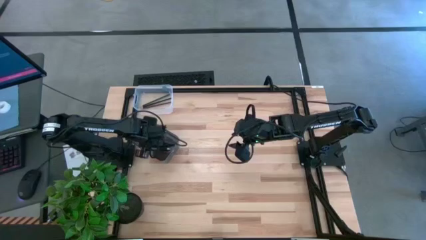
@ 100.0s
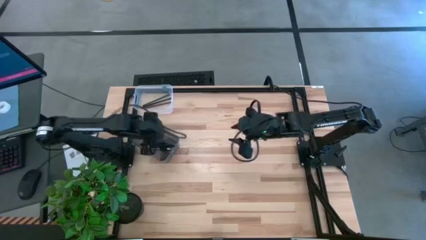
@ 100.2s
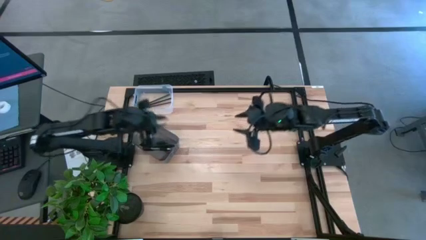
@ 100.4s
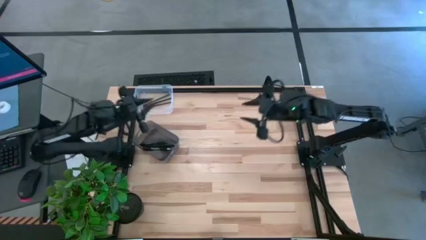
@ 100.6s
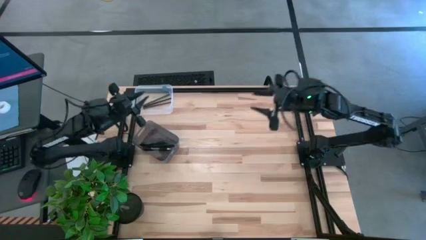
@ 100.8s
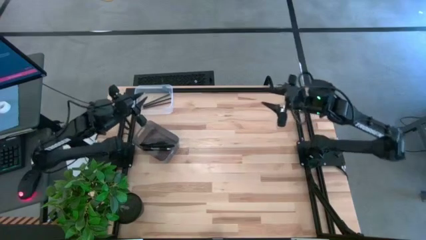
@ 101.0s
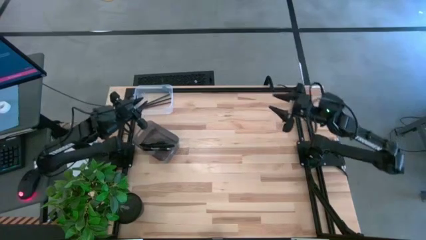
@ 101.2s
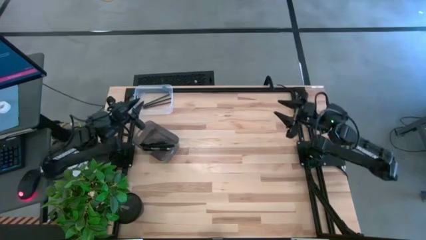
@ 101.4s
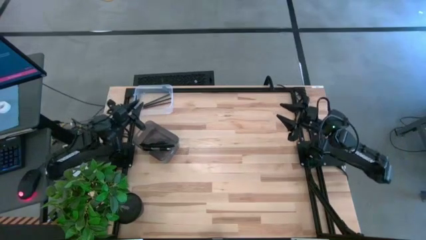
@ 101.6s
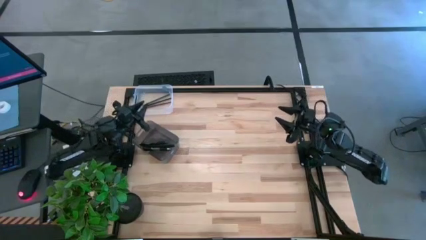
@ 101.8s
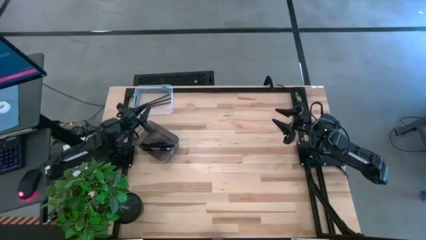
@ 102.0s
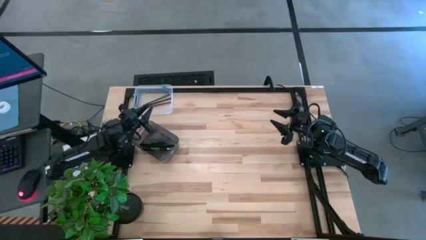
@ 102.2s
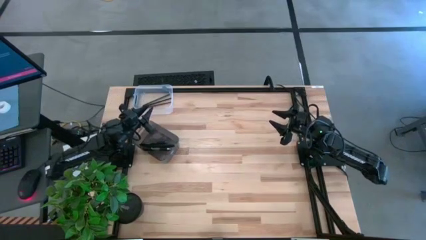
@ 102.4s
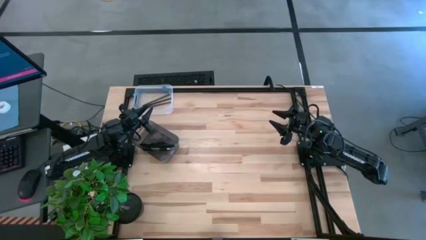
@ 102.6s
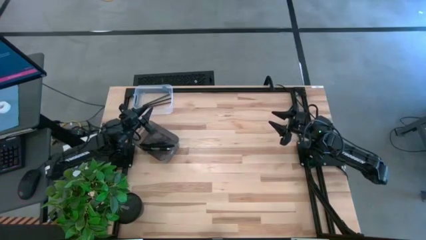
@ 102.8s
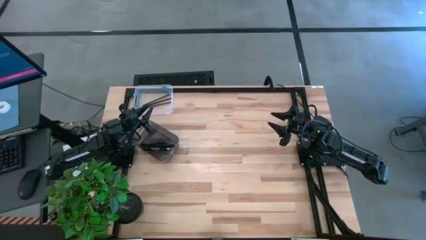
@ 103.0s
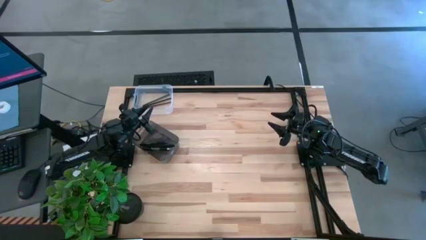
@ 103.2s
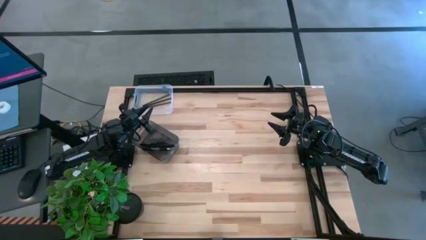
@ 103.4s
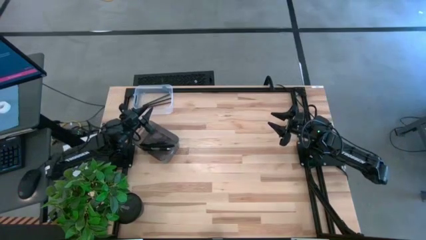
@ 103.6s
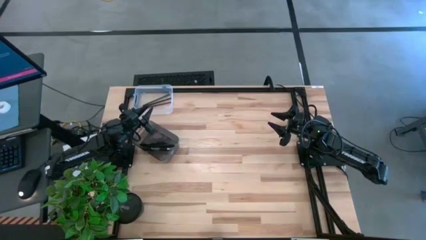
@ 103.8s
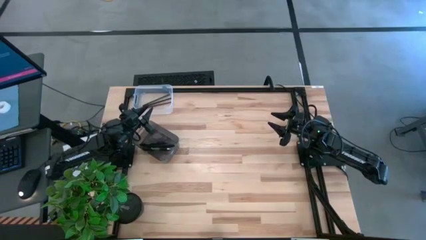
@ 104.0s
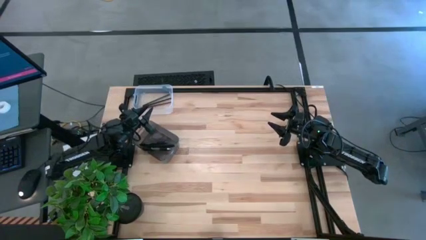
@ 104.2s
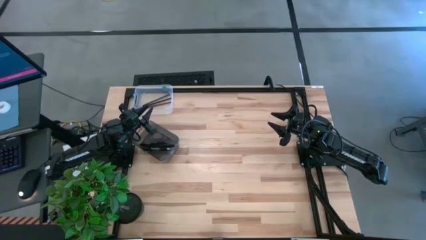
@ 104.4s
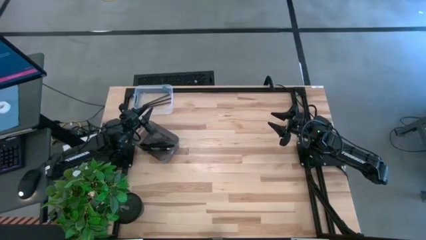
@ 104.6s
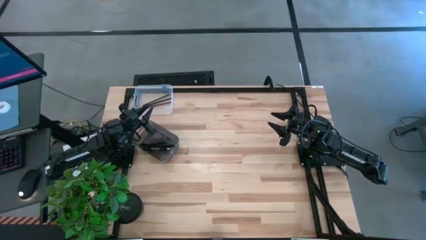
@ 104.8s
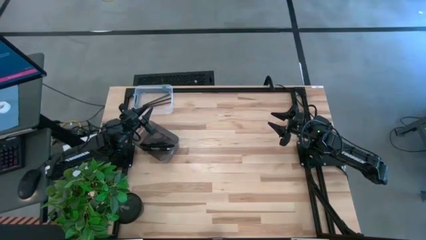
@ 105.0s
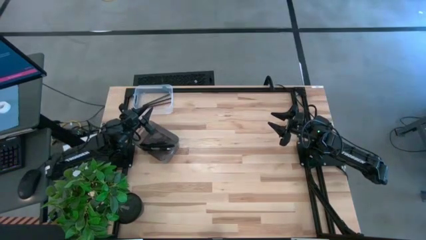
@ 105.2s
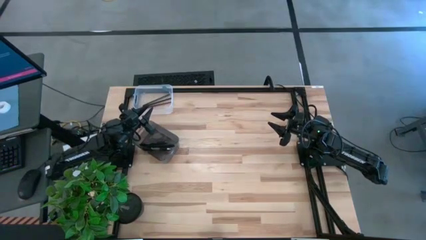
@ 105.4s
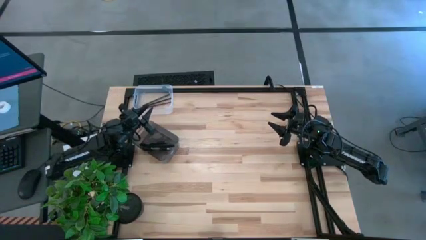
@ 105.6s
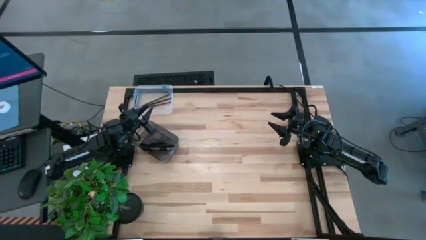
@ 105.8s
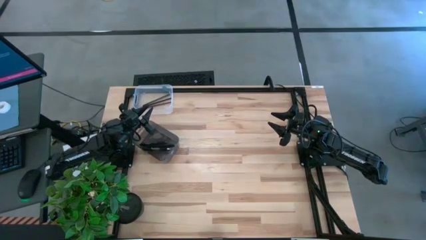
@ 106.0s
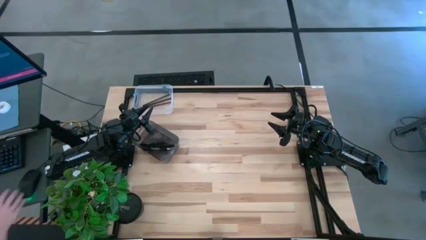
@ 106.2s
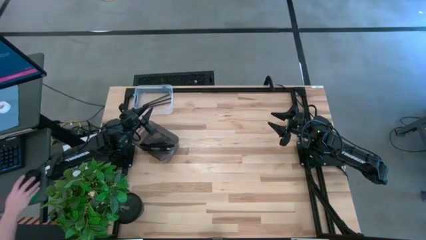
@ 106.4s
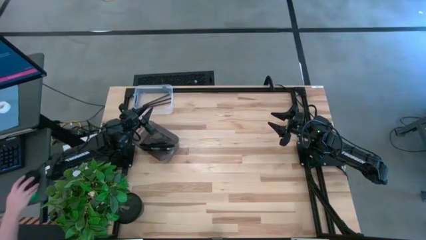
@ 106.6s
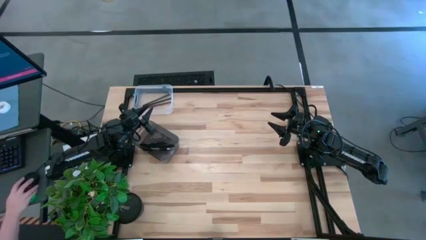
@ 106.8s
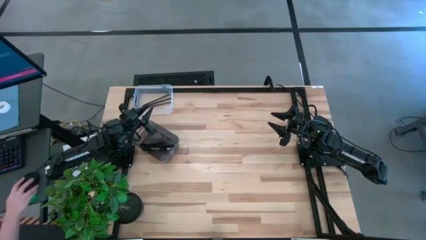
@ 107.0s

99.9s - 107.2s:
Task: Sort pens & pencils
Return to Home Position

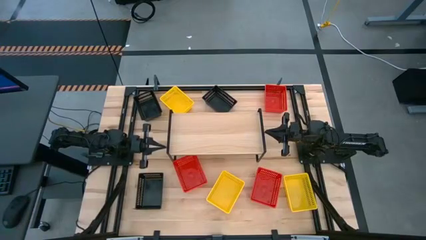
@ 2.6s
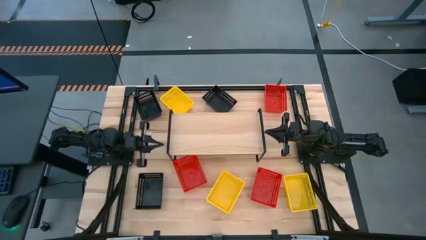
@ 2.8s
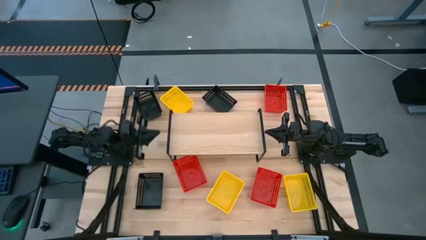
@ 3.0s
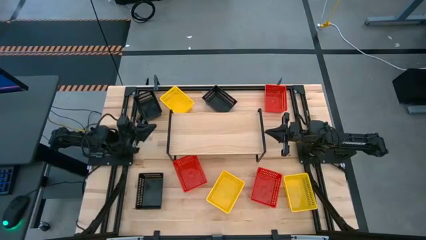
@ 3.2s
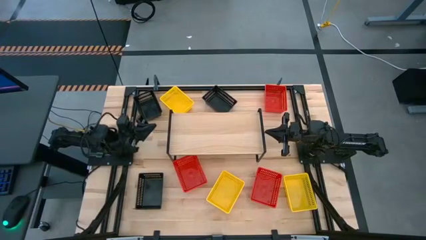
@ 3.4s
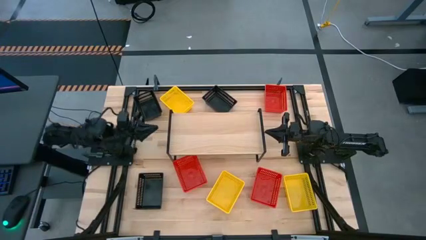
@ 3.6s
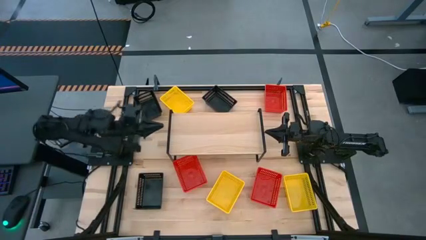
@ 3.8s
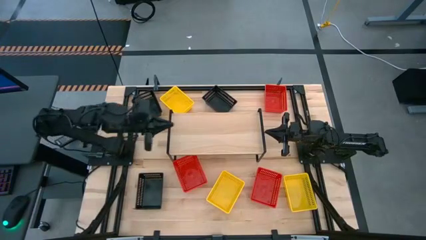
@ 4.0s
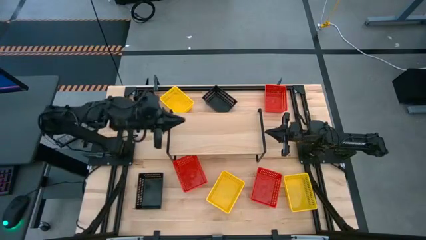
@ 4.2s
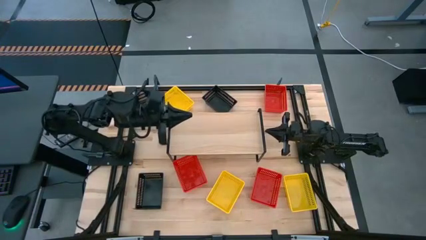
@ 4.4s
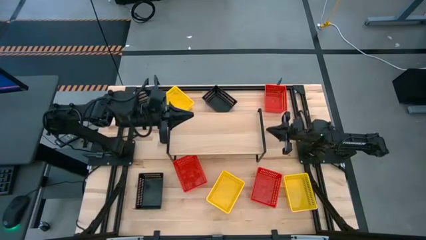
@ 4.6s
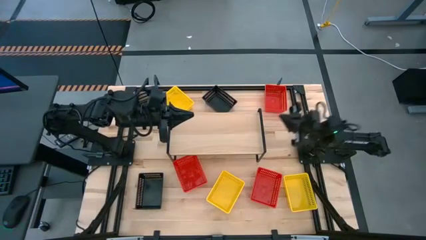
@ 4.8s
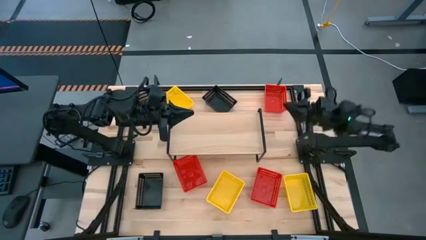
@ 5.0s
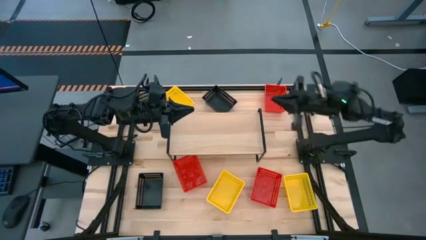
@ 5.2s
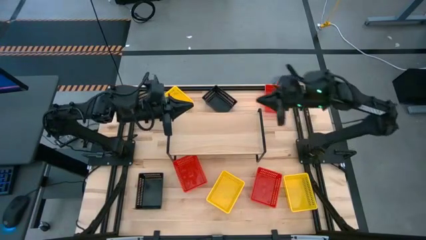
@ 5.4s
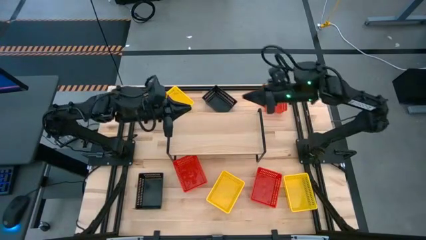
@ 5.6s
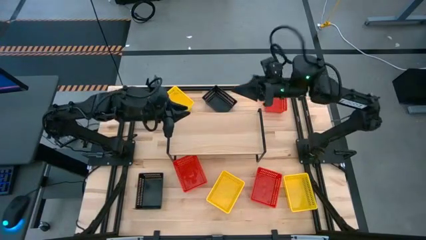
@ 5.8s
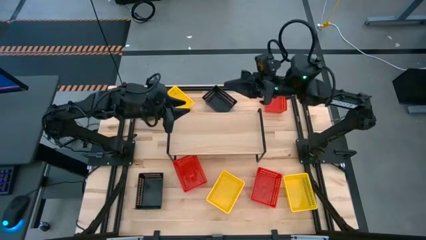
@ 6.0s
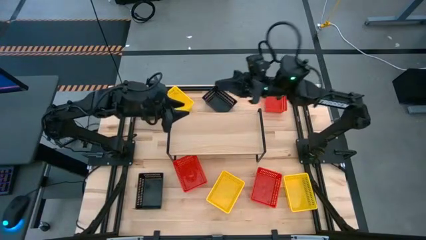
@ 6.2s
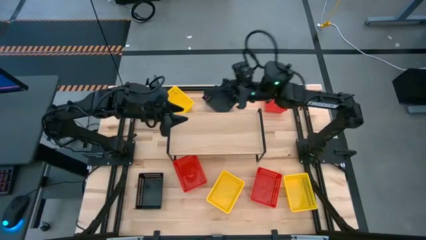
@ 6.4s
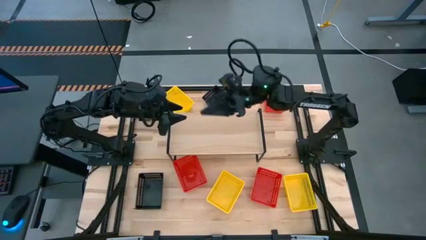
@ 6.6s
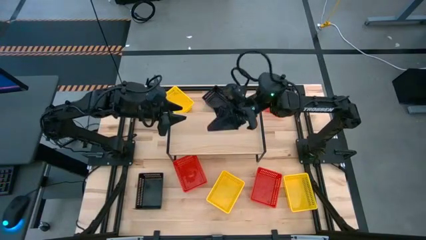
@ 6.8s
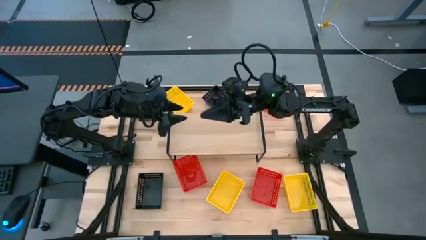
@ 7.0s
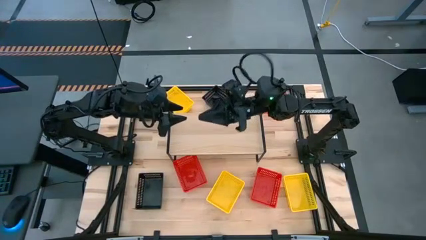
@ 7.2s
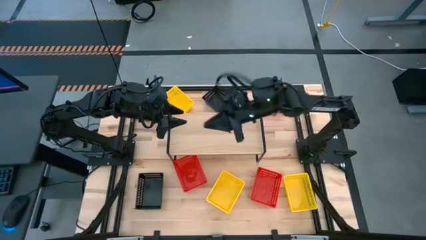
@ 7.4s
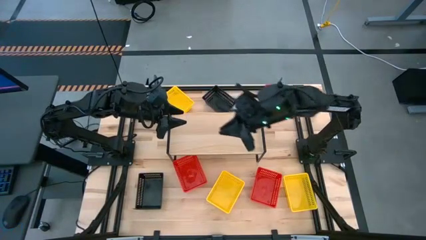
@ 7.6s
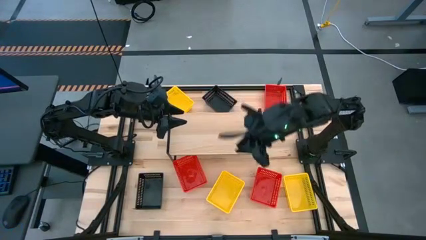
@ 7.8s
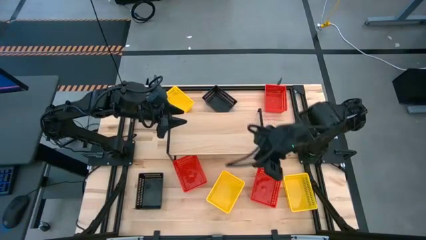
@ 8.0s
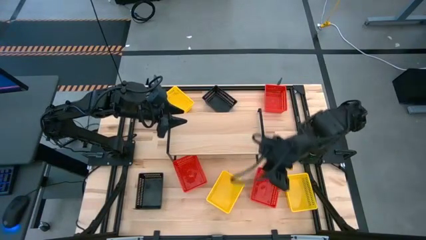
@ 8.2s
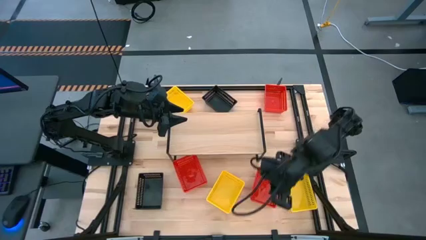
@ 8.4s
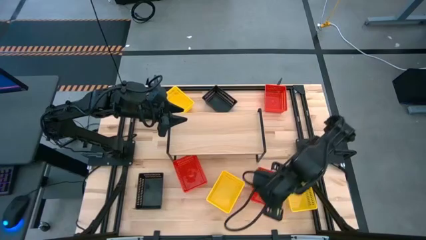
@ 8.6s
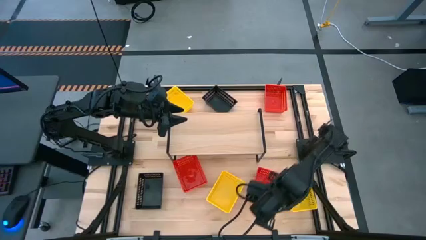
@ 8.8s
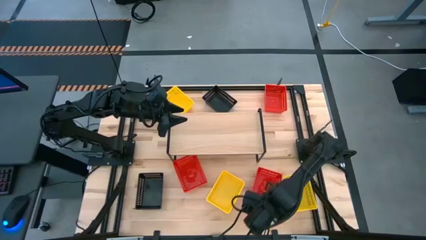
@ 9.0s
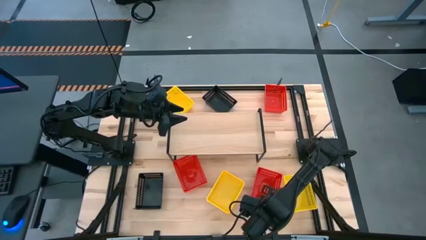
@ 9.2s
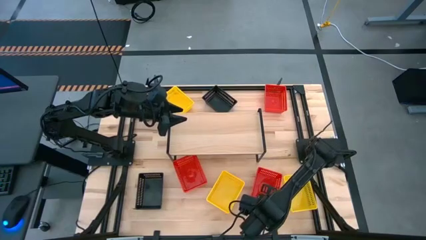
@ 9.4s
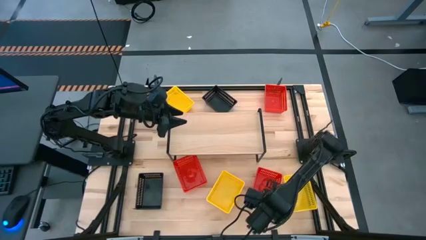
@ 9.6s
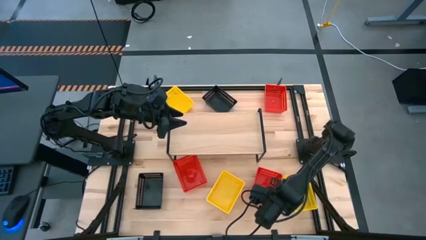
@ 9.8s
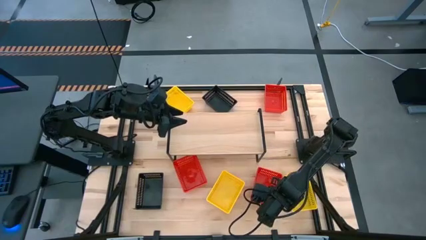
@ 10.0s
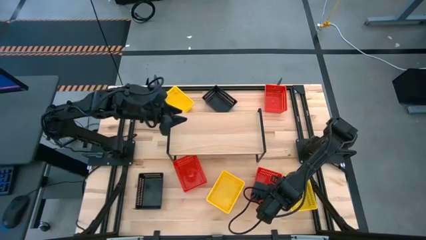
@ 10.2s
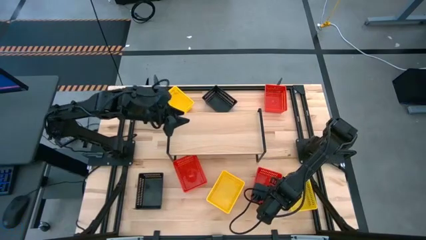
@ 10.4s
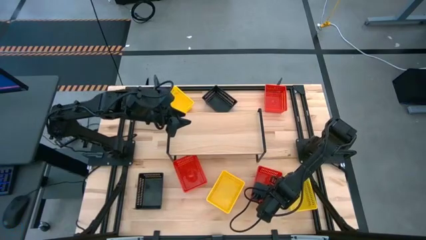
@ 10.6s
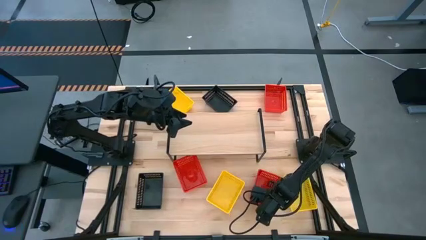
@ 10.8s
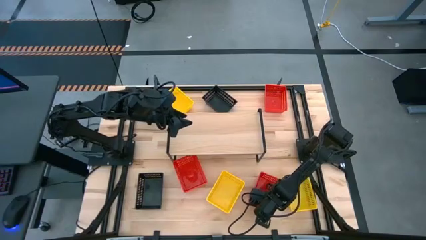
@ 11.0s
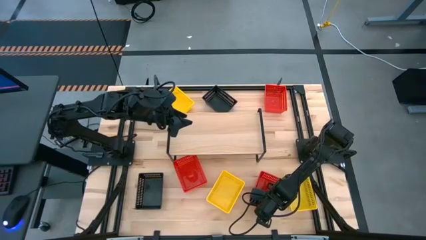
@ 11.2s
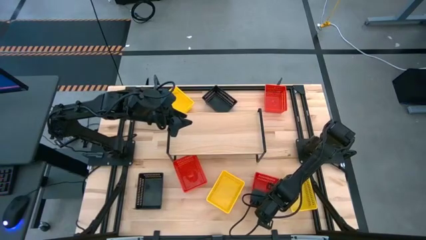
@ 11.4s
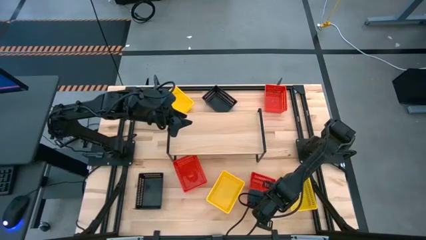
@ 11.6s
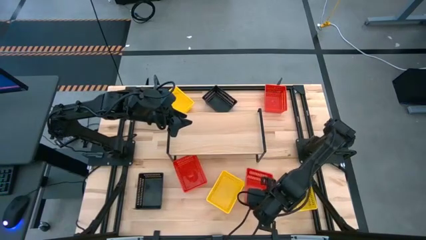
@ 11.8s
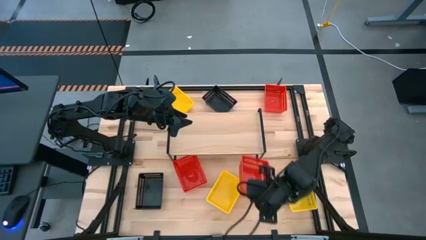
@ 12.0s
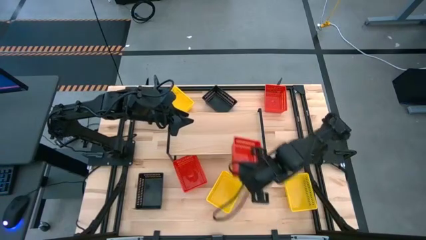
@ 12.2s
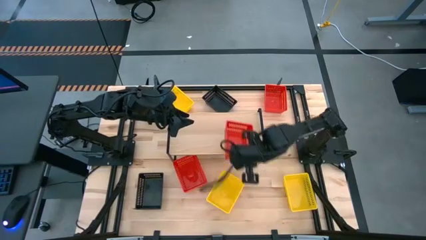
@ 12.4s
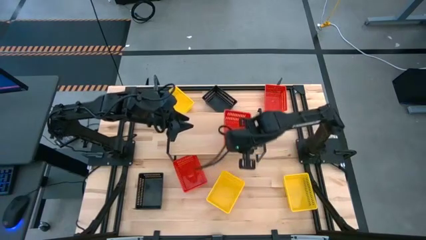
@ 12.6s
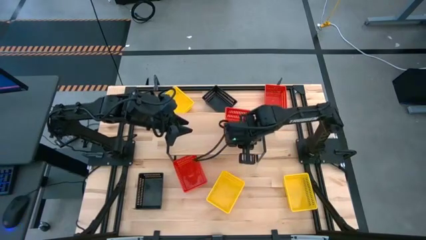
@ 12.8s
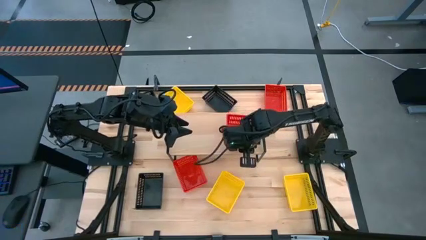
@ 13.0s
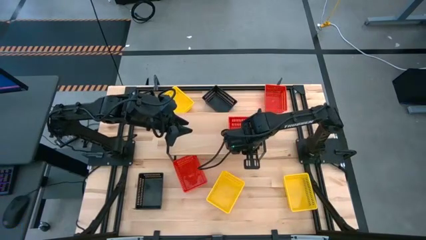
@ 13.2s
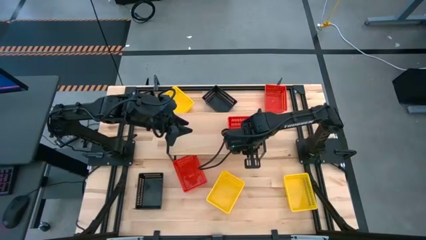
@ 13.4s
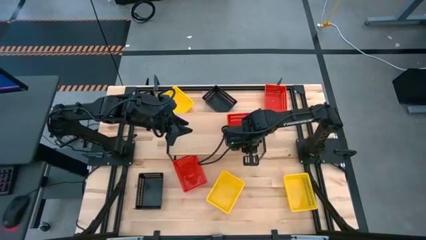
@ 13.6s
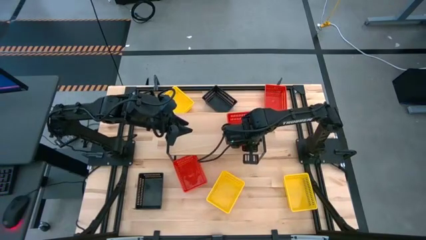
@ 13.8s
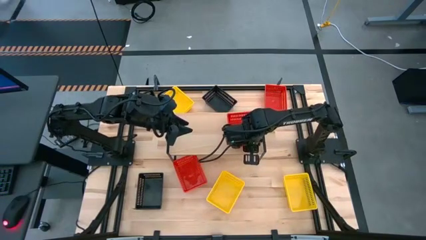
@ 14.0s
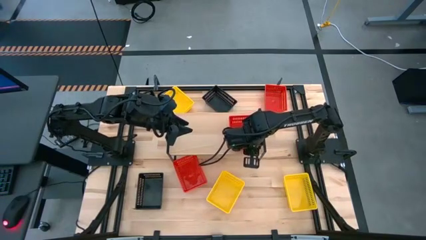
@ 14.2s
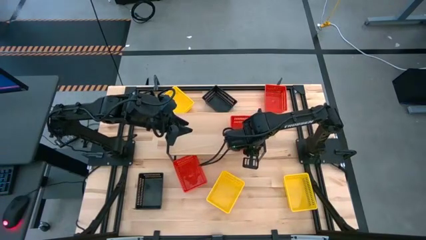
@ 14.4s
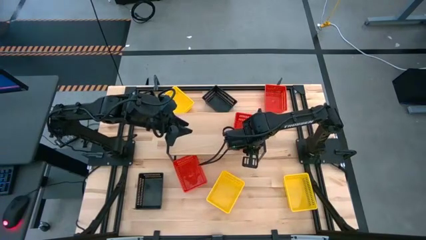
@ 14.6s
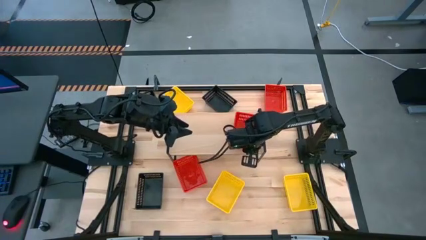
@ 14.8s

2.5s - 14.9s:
Task: Stack baskets on shelf by color
Put the bottom right red basket on the shelf
